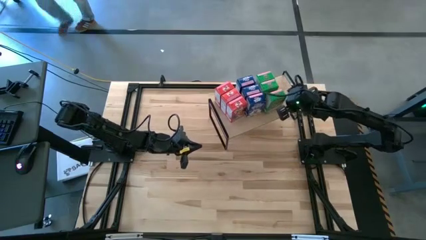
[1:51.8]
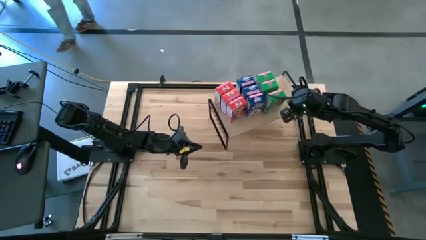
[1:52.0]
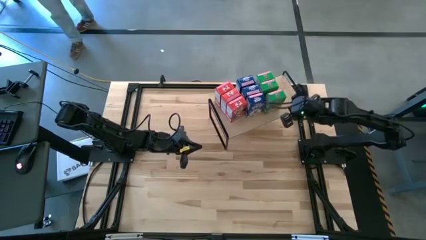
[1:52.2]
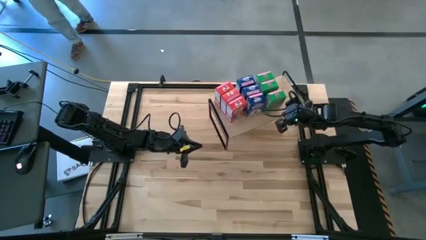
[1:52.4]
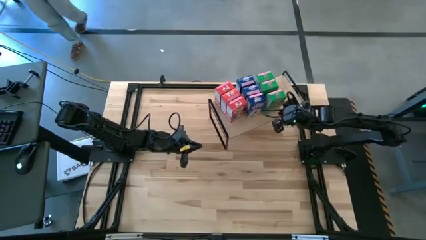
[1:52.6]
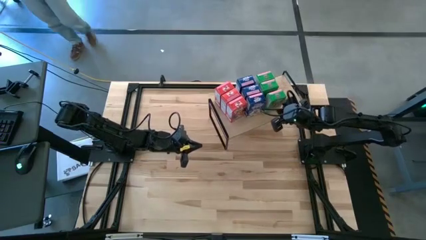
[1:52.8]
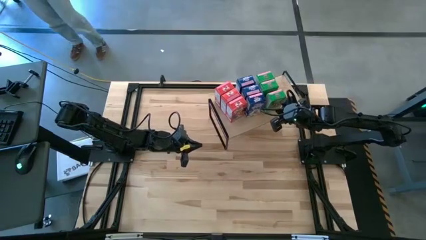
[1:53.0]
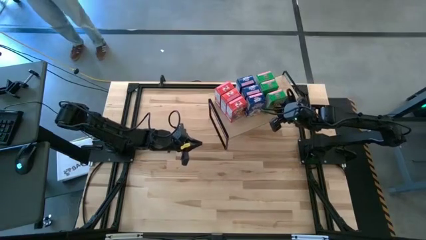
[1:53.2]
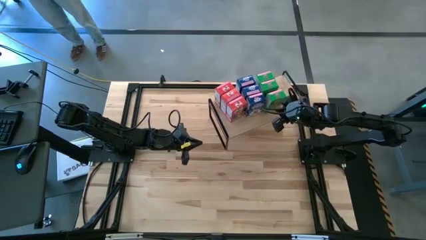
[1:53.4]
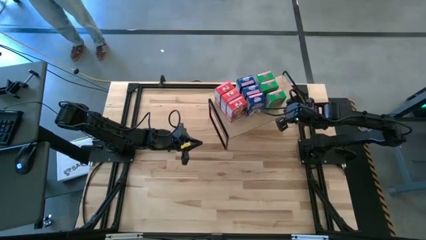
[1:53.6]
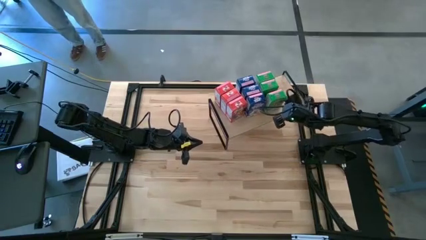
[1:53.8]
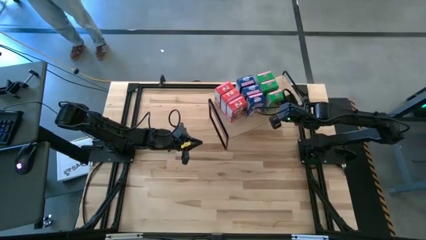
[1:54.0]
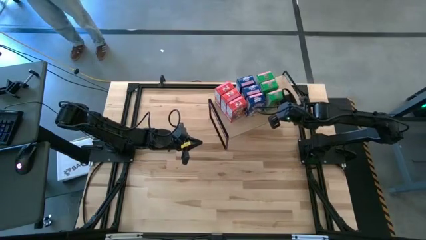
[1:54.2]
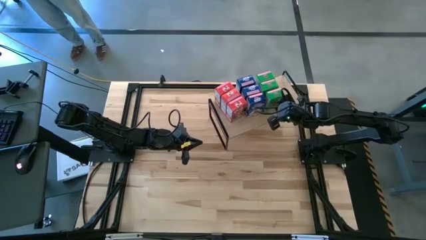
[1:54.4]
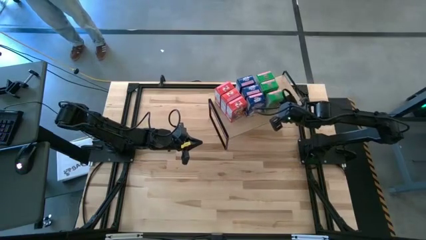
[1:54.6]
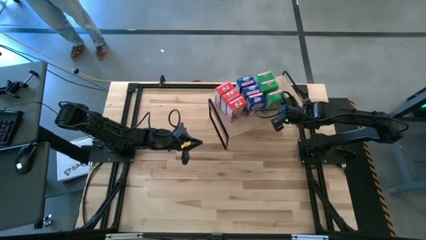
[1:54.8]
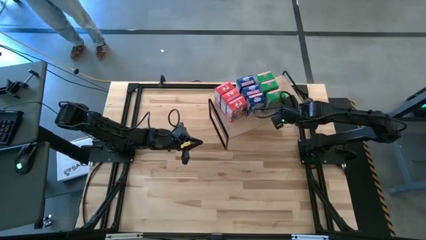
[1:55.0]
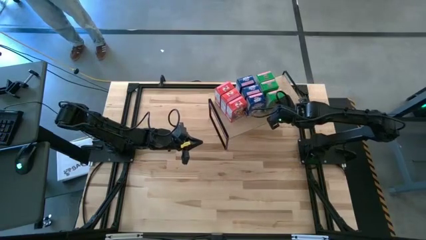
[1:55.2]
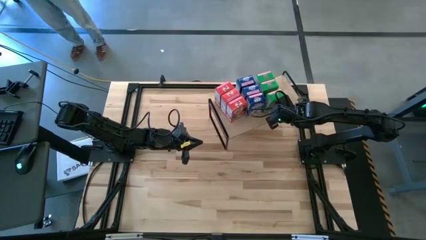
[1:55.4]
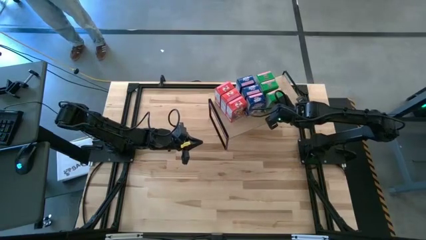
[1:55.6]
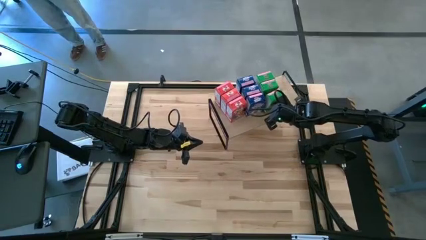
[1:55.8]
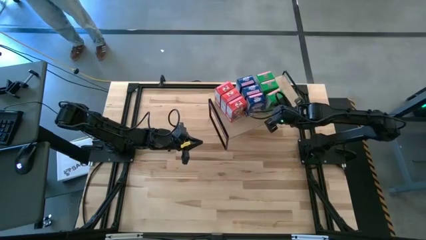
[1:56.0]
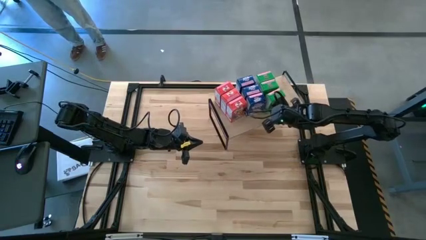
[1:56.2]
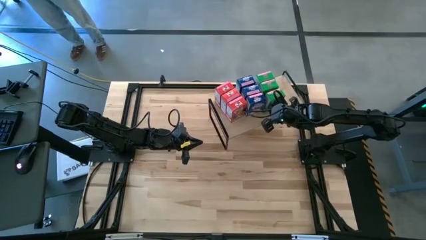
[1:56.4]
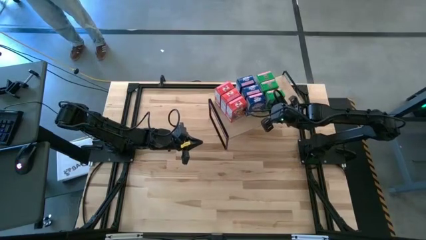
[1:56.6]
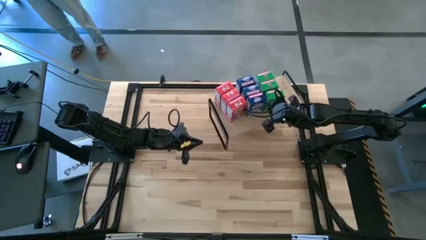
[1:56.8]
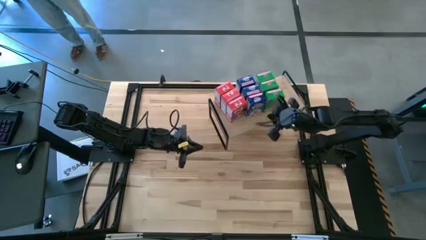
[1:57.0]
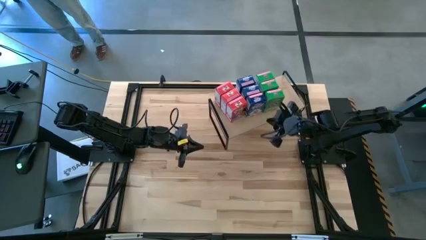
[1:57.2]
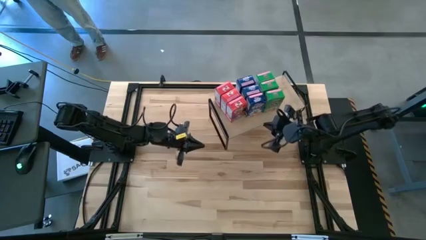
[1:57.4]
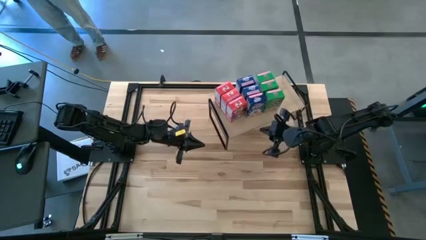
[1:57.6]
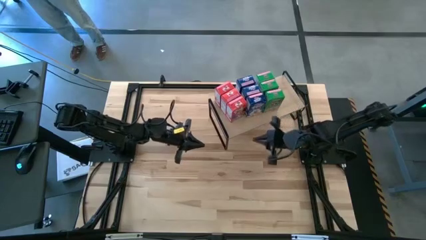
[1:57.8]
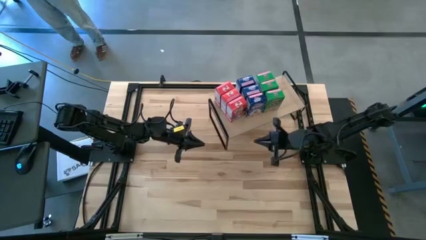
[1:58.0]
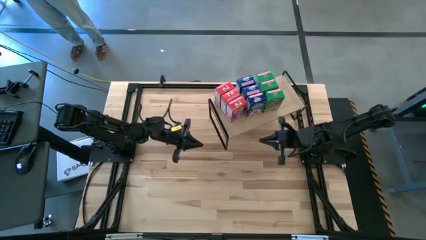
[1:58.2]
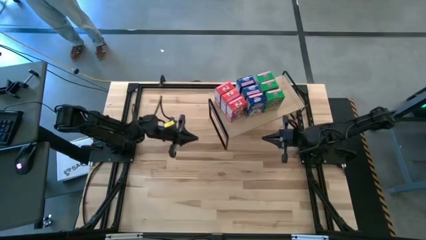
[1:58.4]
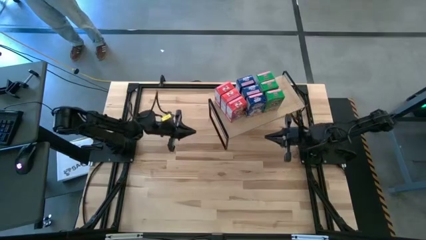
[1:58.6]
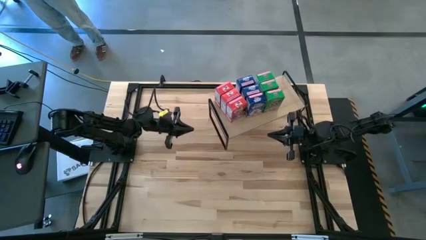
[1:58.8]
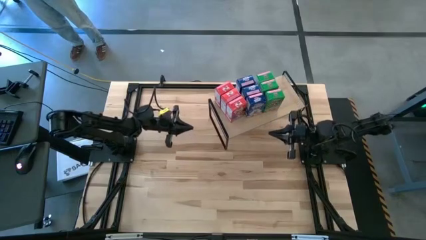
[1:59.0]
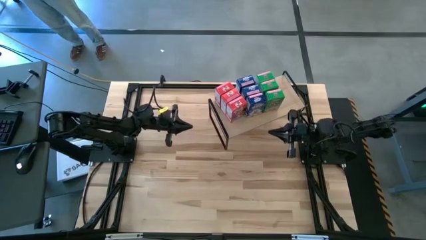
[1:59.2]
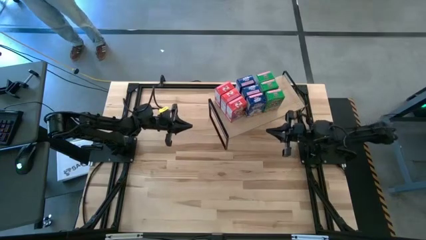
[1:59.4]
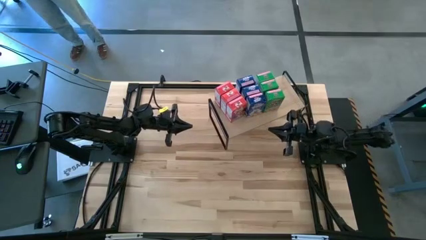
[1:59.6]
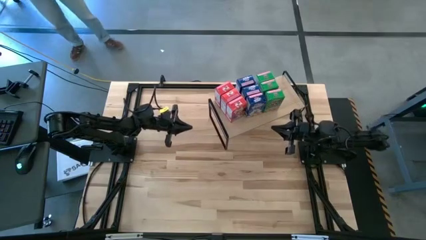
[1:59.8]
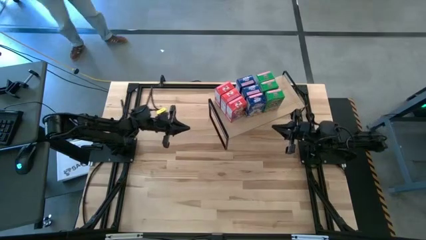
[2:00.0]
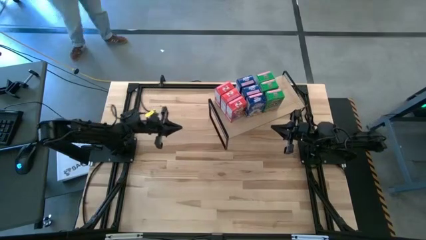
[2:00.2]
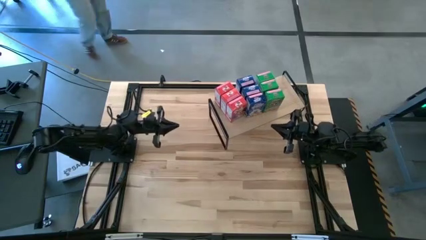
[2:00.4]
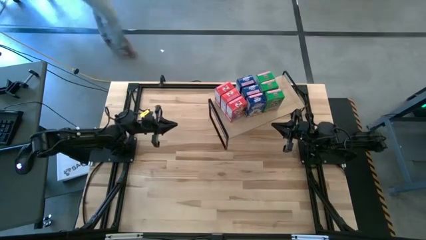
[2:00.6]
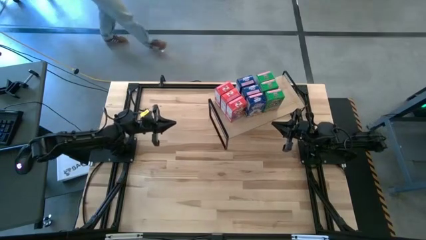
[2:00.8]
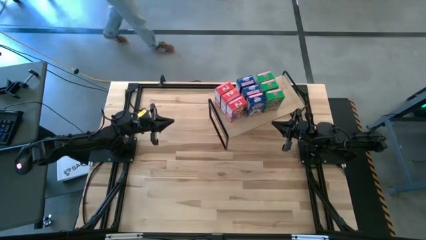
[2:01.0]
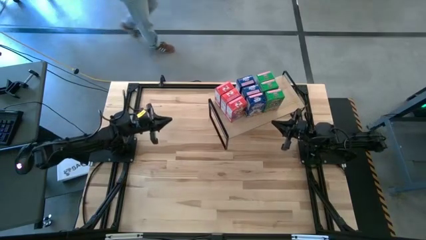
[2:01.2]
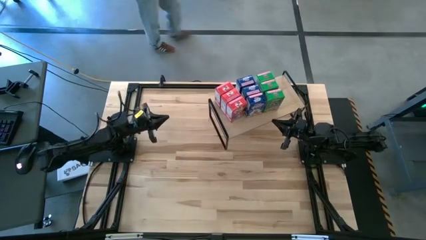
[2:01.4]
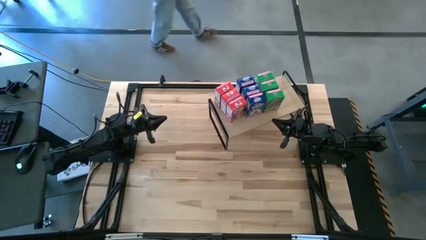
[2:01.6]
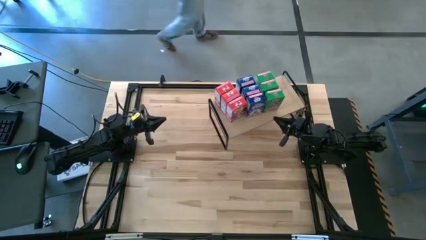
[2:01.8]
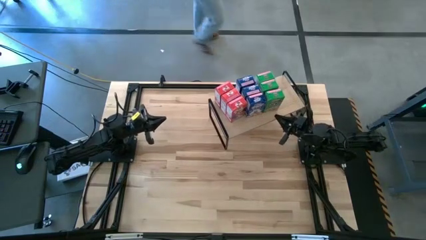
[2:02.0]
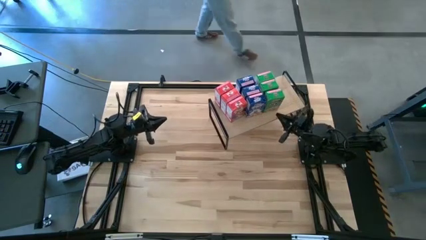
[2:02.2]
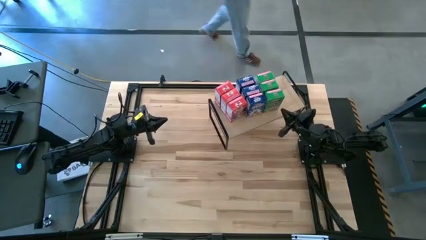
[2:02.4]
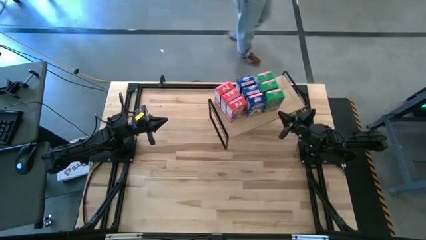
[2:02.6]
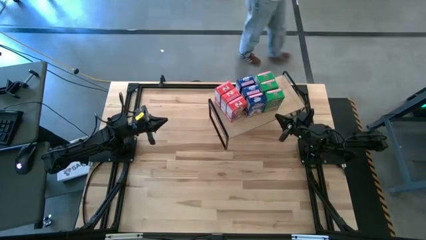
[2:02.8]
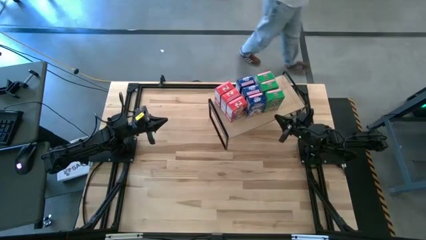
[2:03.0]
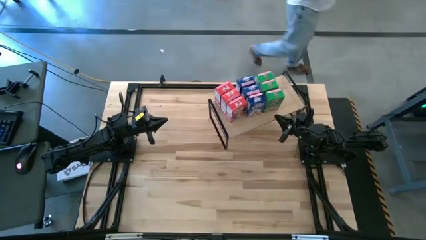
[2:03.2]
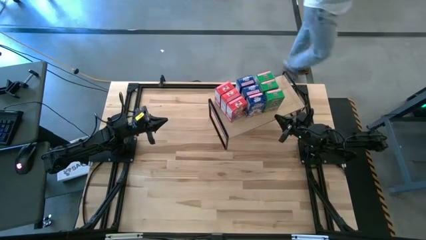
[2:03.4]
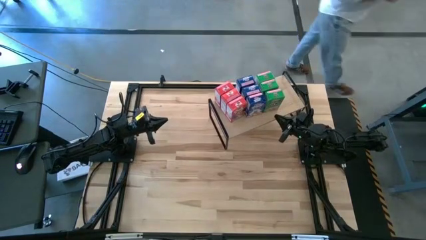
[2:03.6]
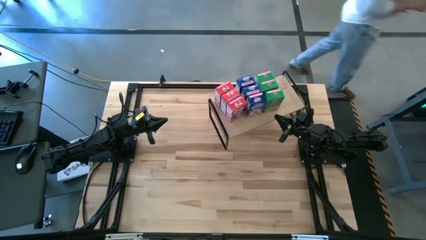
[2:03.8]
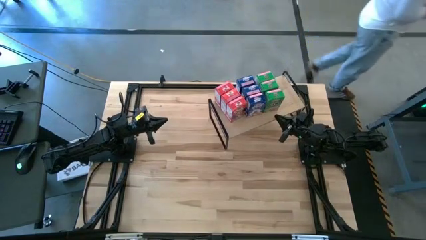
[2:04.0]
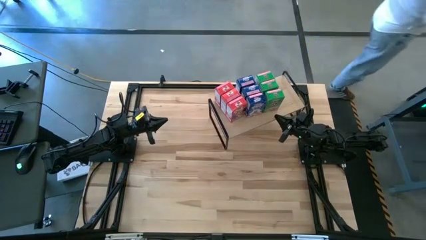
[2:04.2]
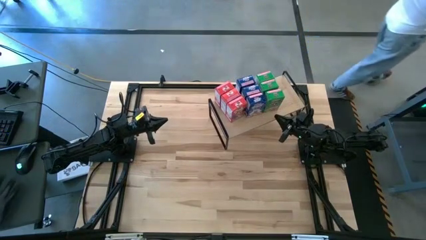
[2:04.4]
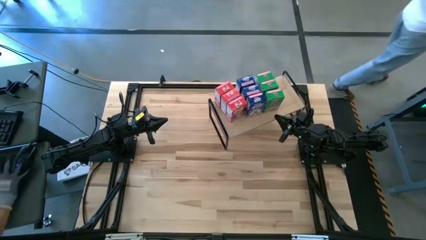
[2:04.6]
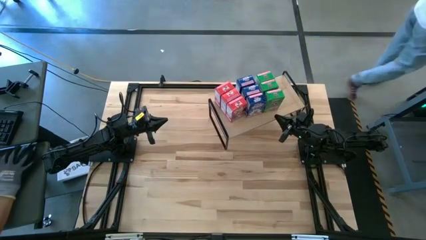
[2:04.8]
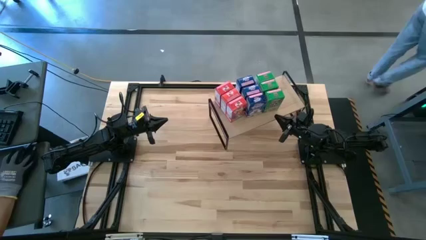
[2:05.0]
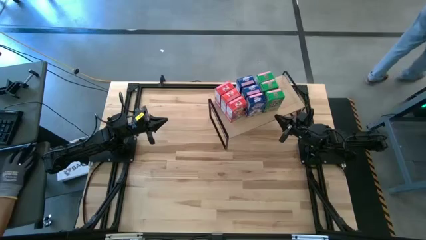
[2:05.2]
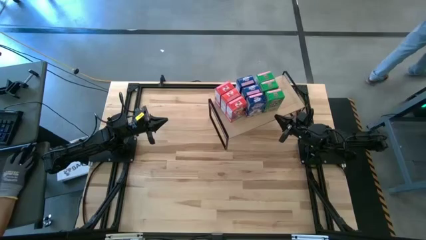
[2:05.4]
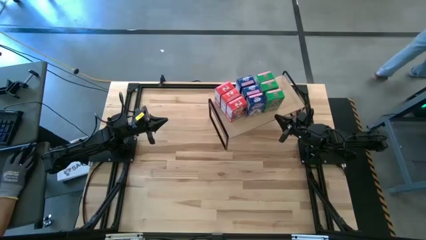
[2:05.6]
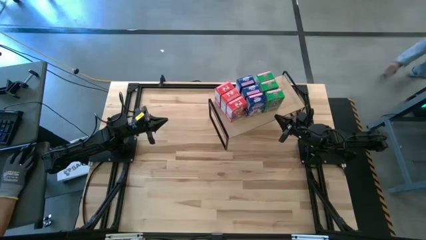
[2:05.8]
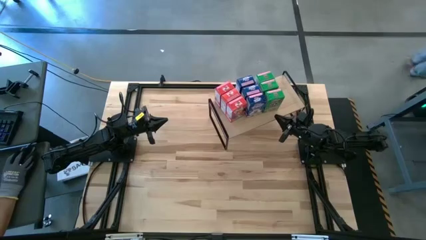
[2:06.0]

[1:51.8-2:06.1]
Task: Stack cereal on shelf
Return to Home Position

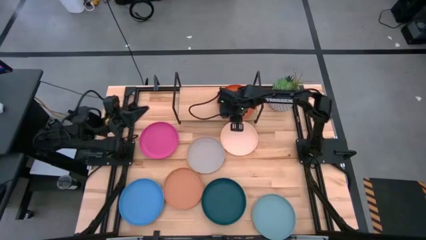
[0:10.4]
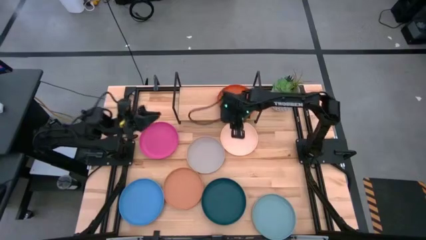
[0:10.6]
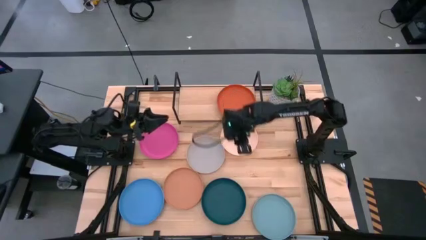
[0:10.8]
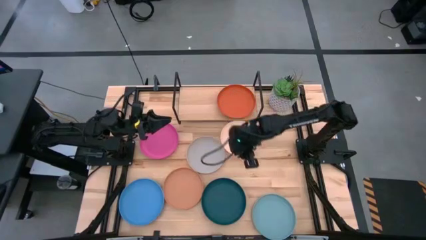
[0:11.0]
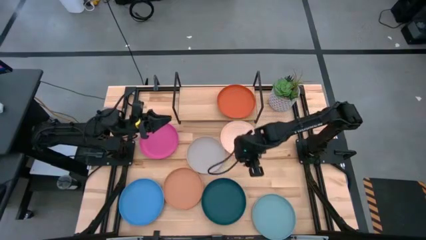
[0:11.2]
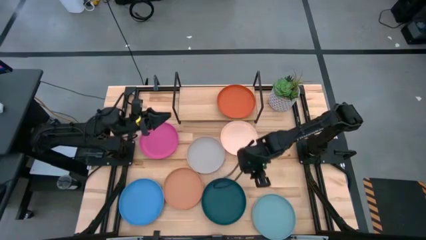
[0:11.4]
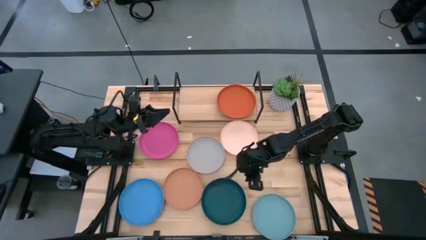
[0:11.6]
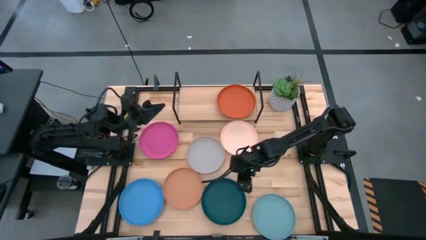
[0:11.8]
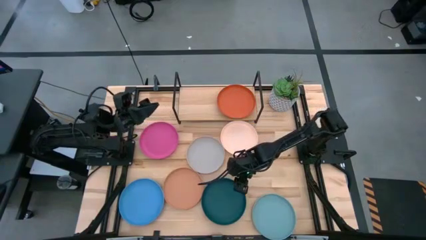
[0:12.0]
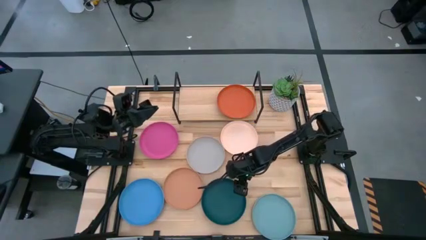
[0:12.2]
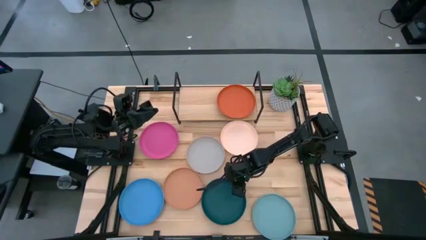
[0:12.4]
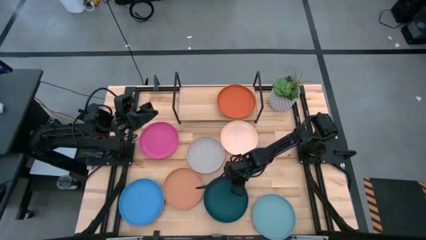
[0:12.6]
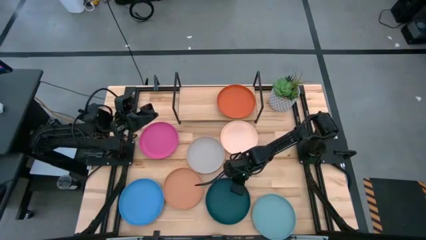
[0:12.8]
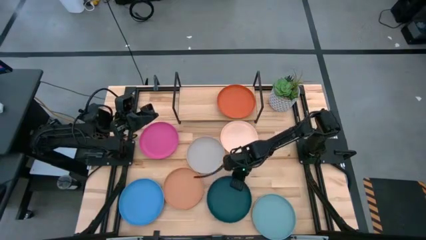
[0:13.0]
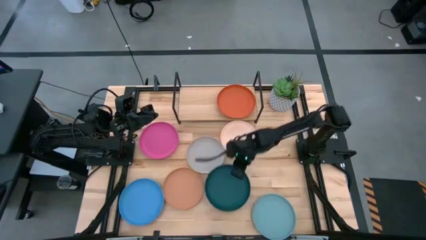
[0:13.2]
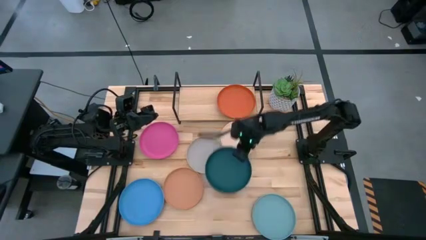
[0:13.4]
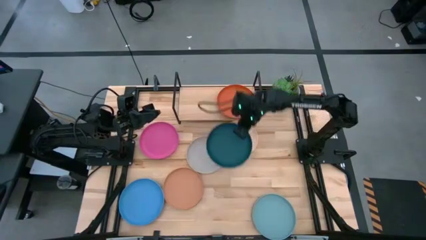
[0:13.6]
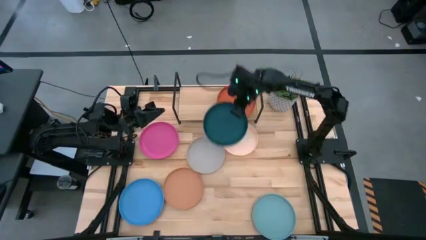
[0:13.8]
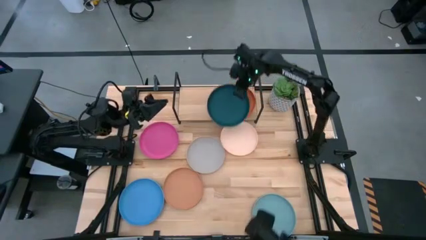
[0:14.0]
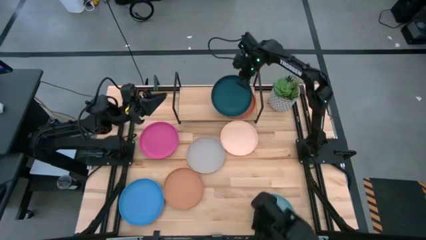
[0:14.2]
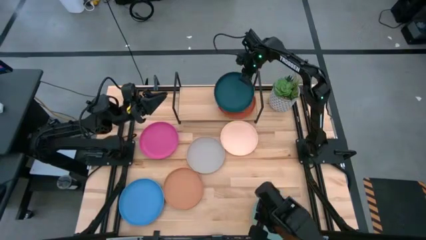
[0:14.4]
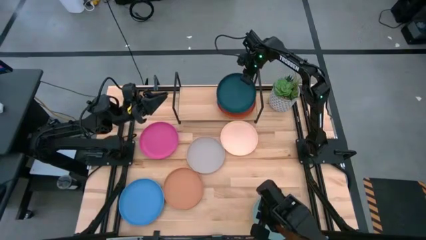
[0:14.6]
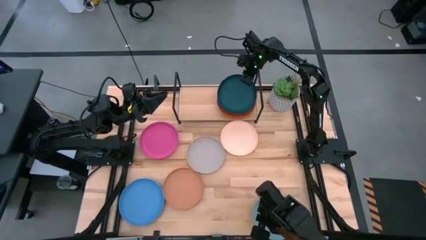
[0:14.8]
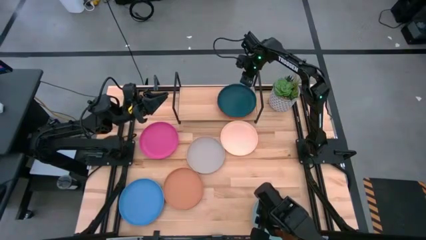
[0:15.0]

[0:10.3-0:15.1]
Task: Place and stack plates onto a shelf
Stack the dark green plate on top of the orange plate on the shelf
